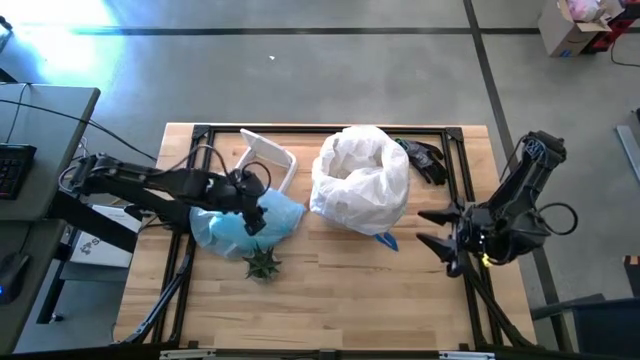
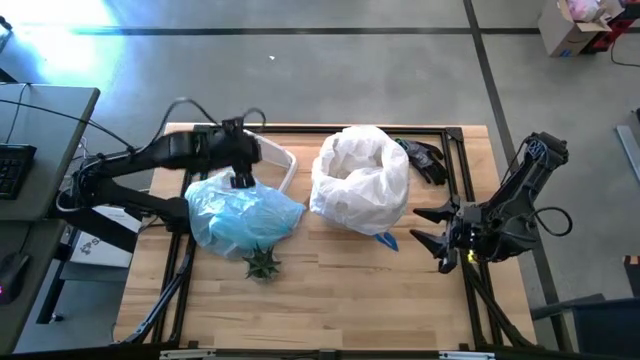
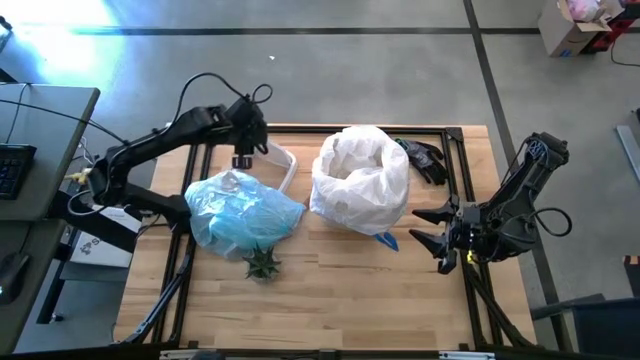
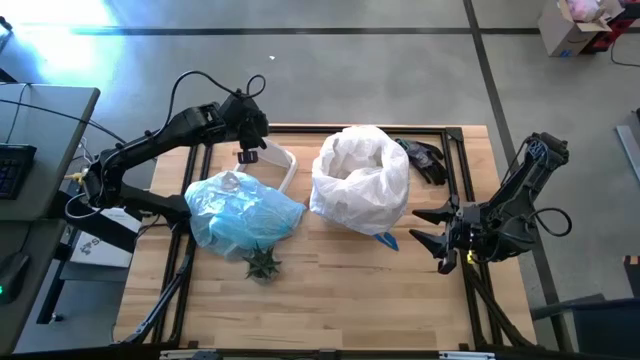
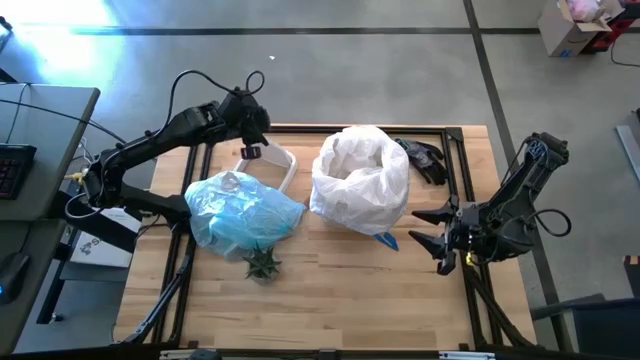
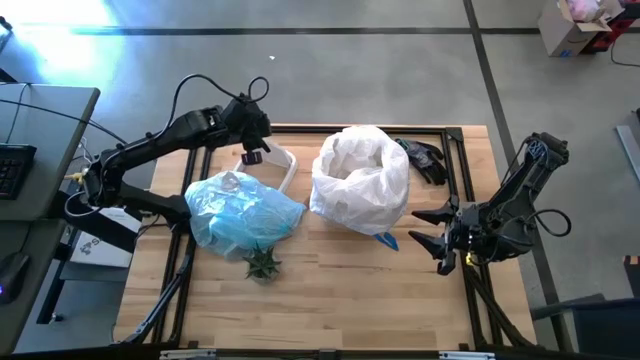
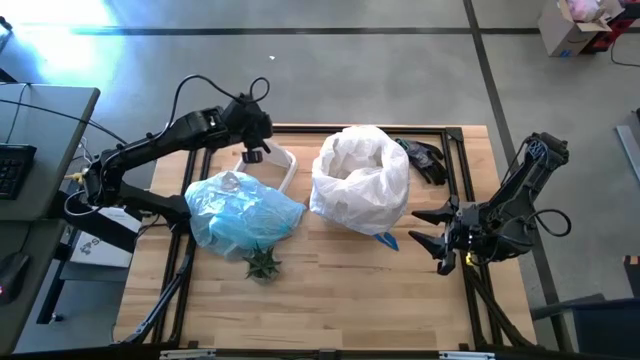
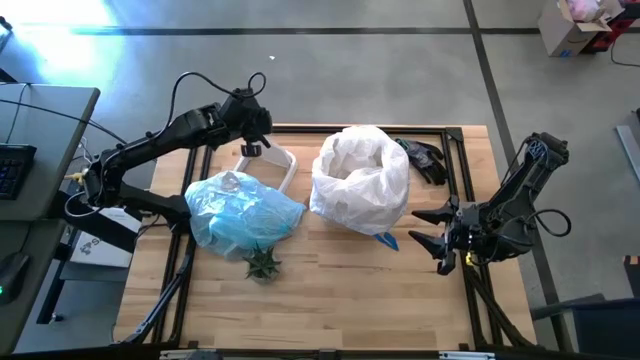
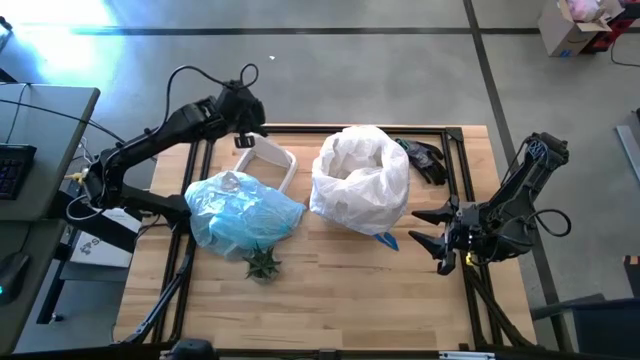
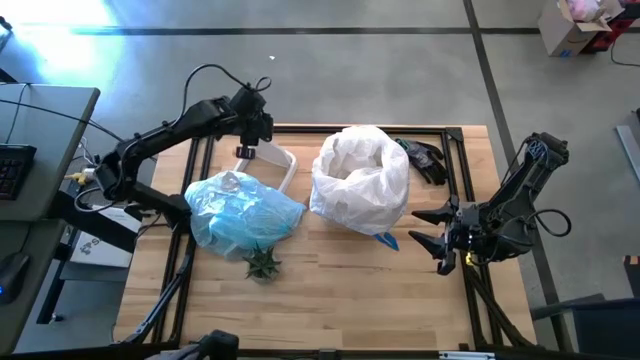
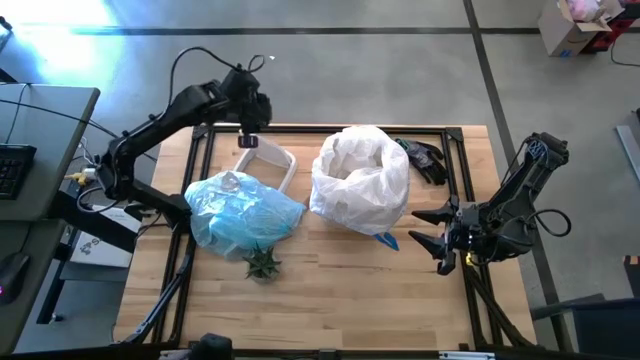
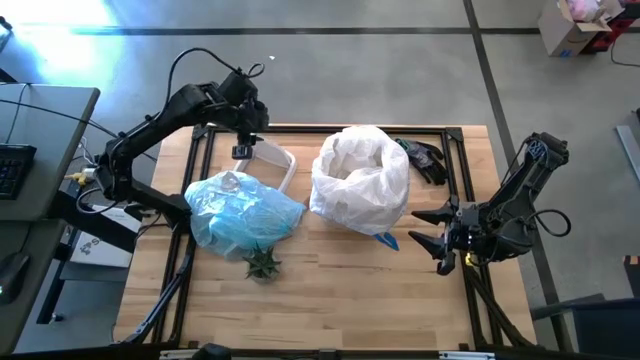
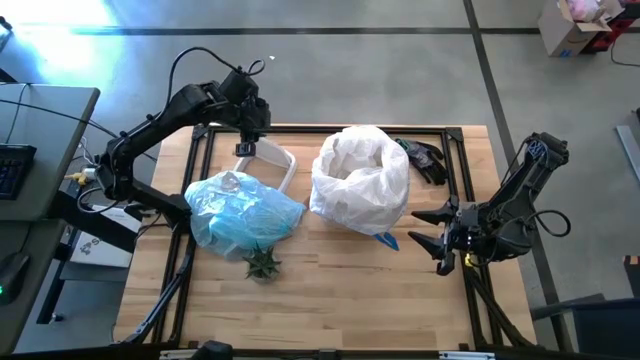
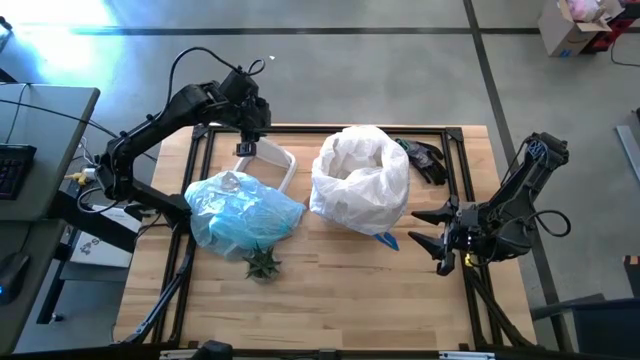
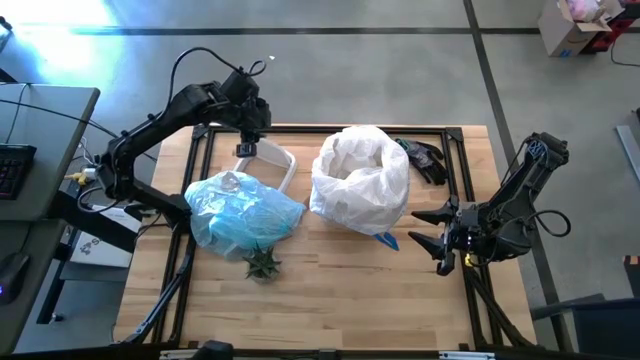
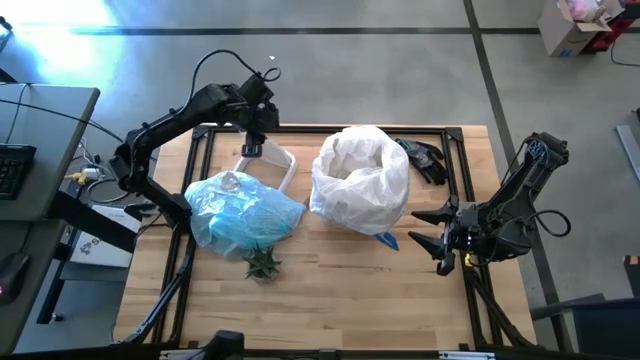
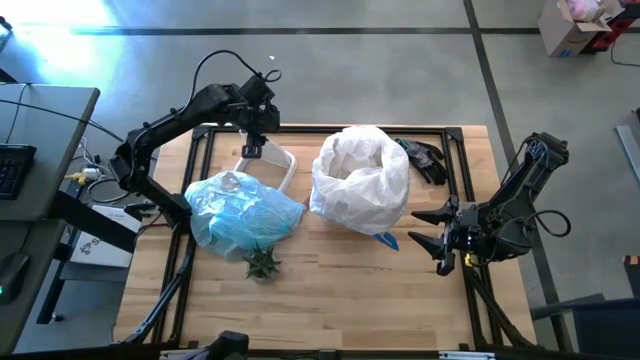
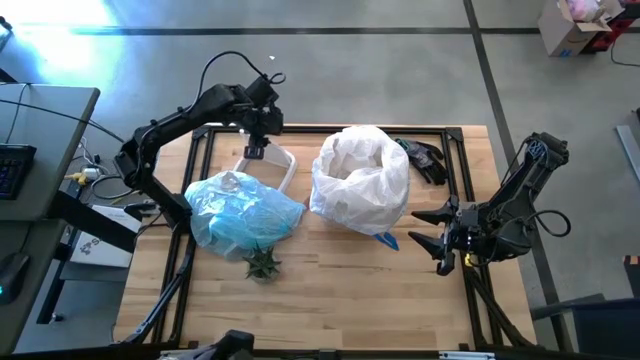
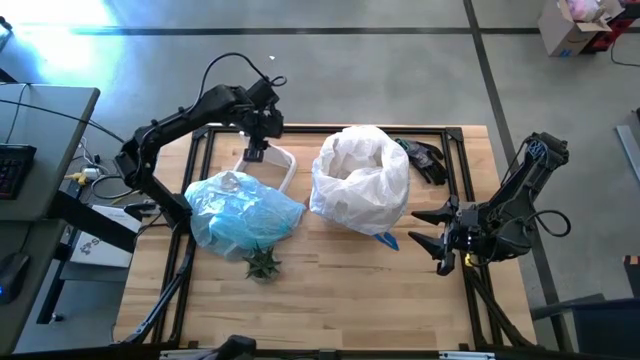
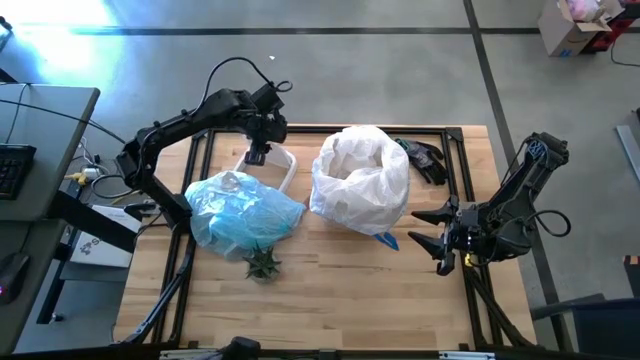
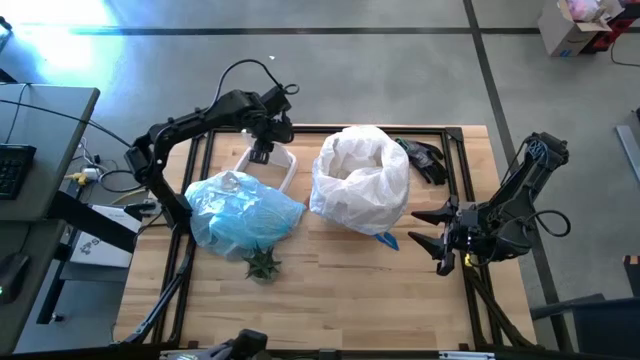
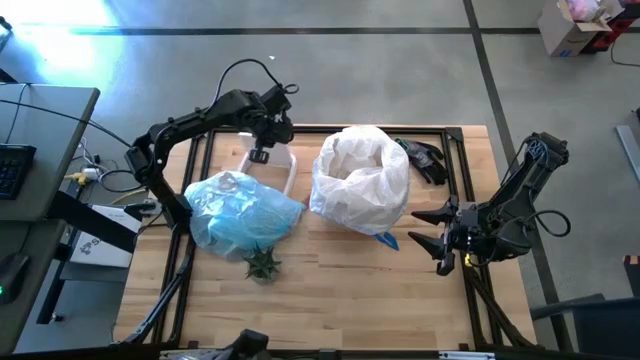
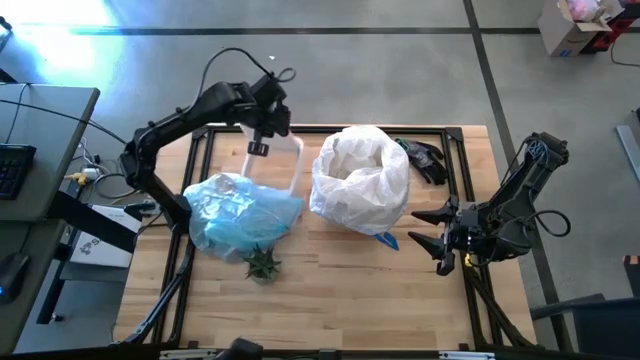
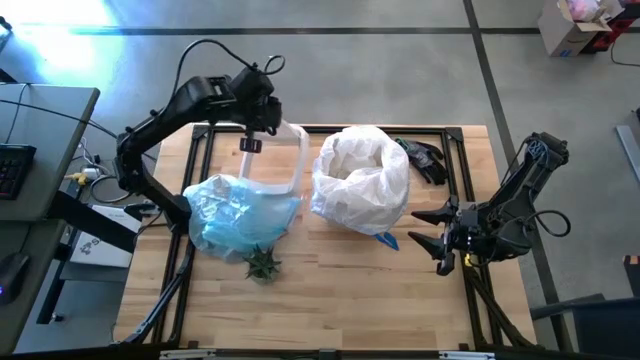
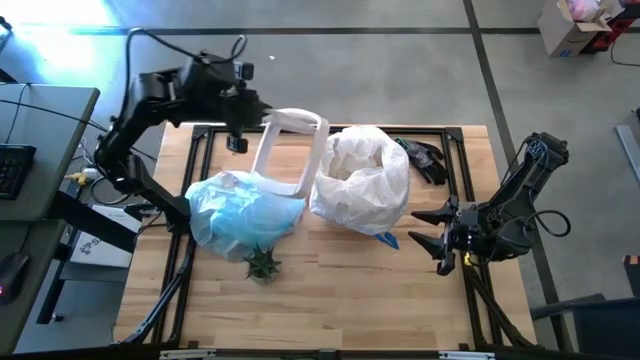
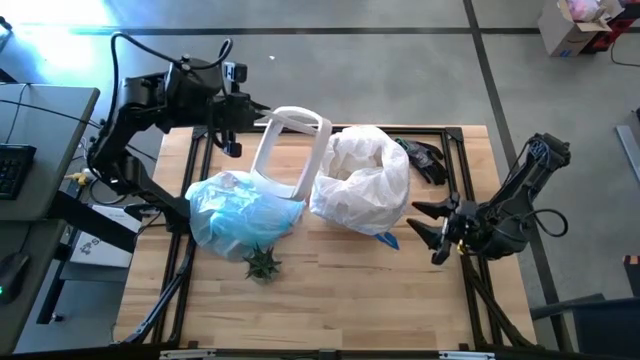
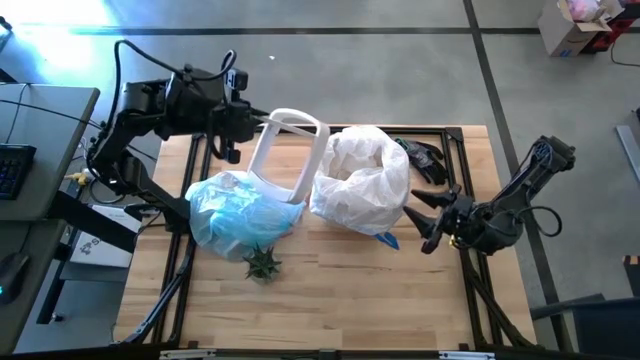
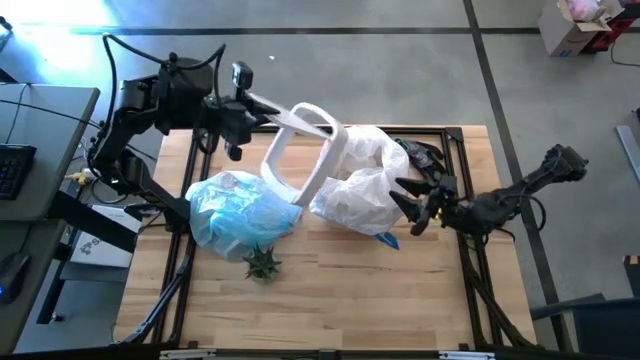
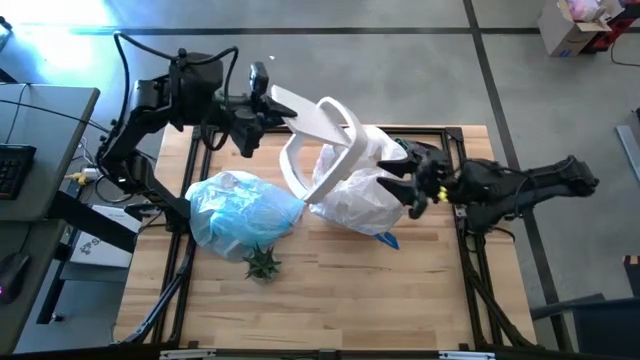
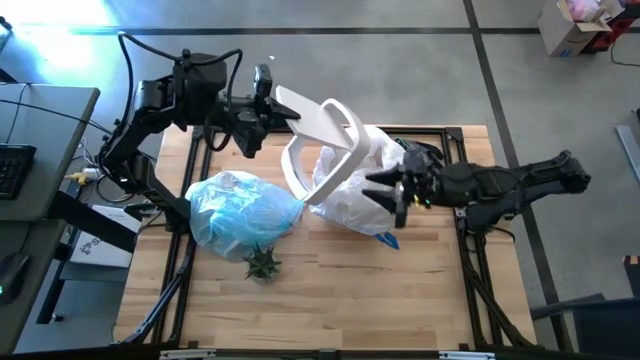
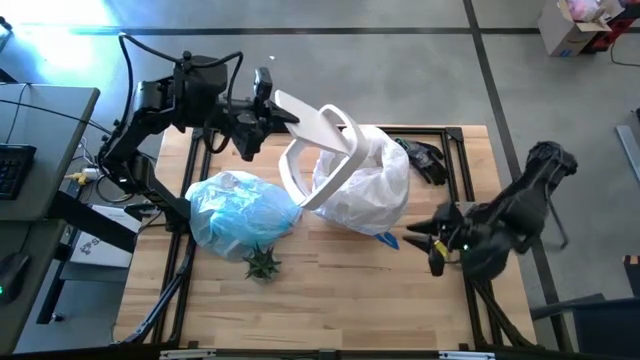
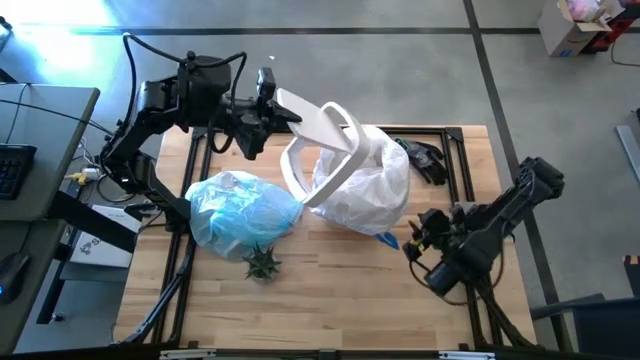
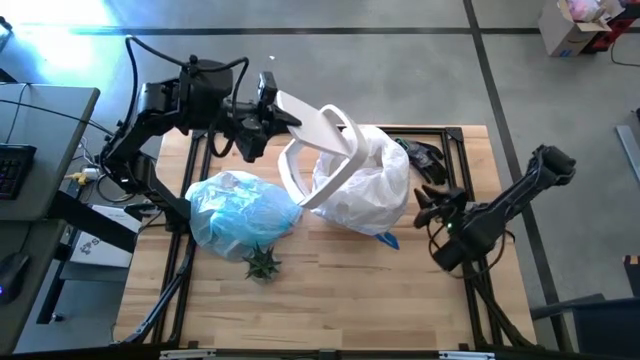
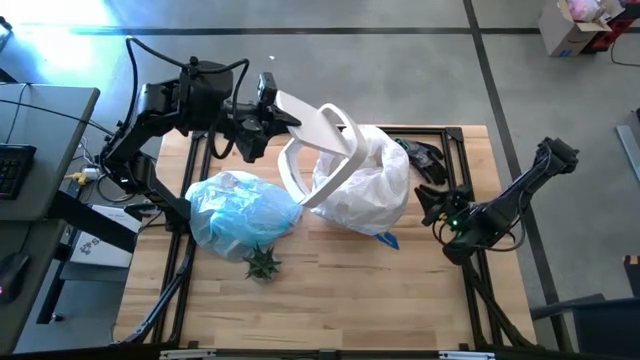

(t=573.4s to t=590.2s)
Task: place trash/remove bag and relplace
Close the trash bin using the trash bin lid

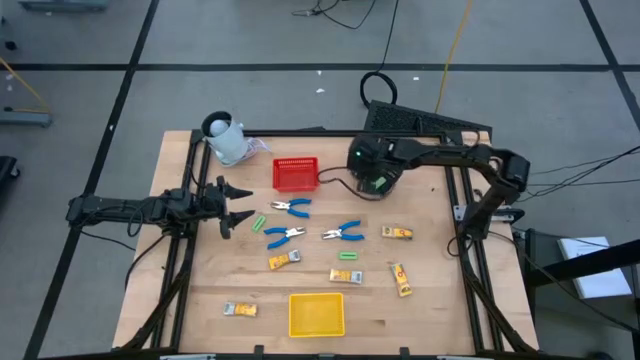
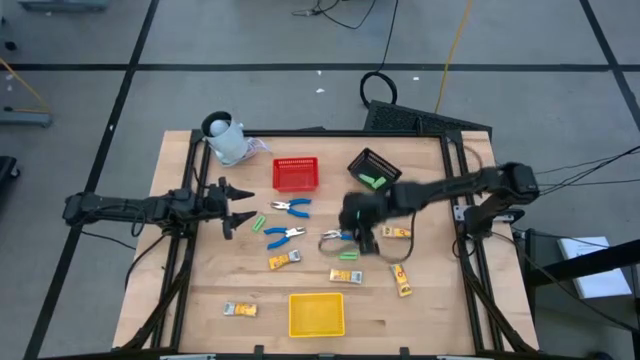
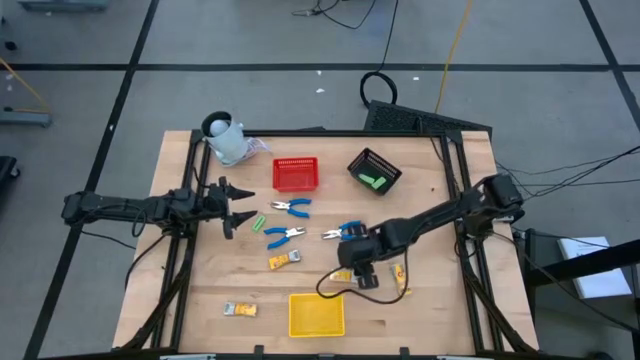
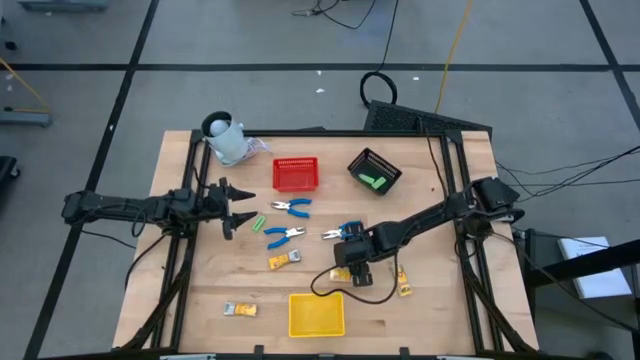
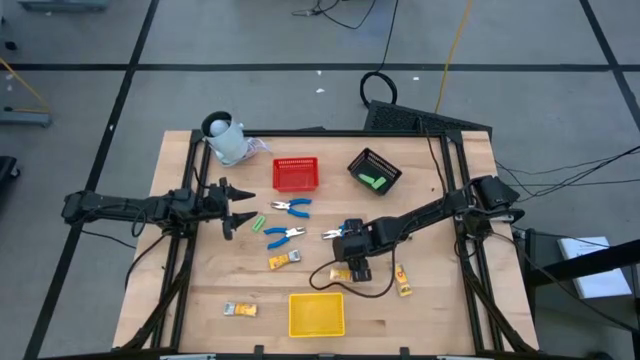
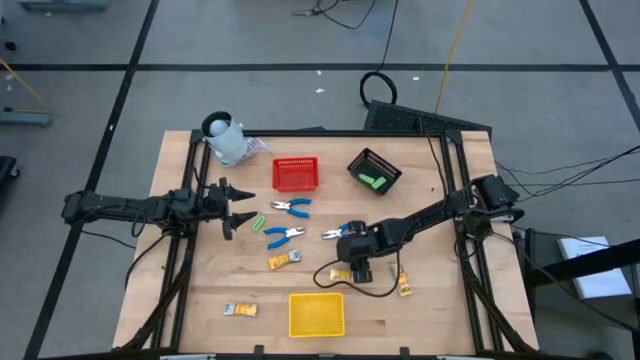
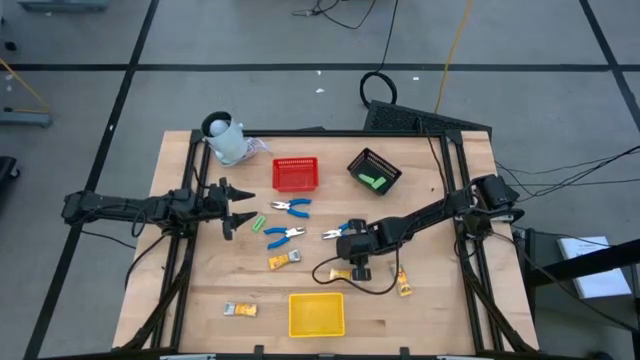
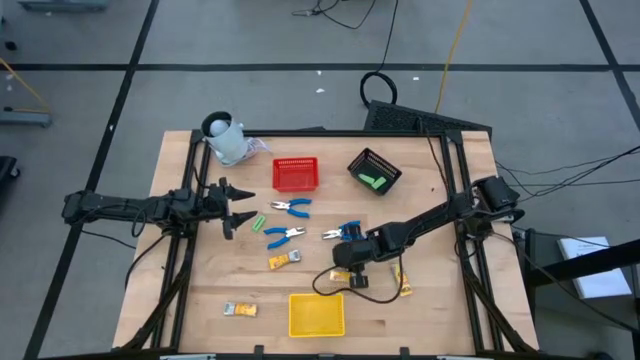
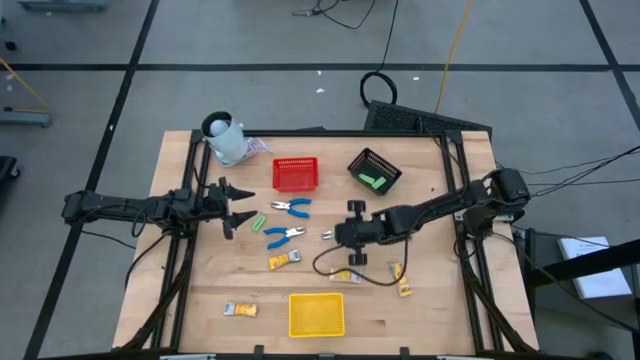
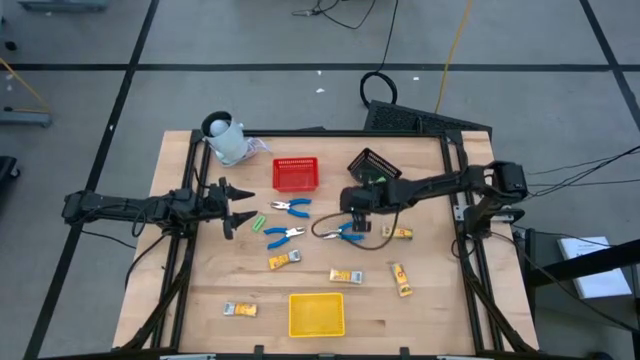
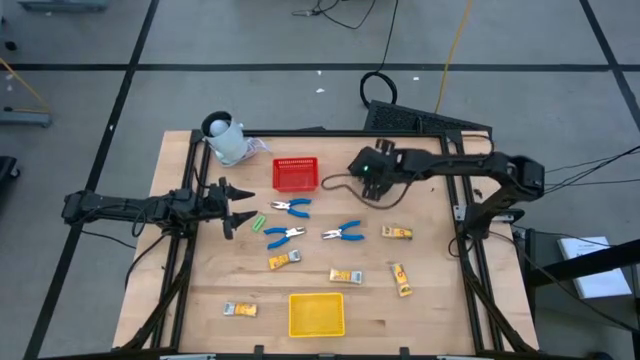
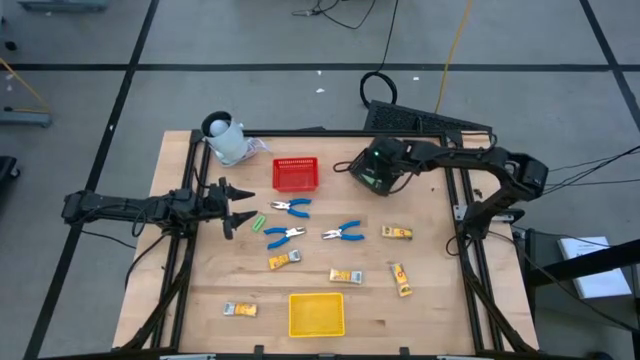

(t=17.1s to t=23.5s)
Task: Pick & Place School Supplies
Put the green eraser into the black bin
